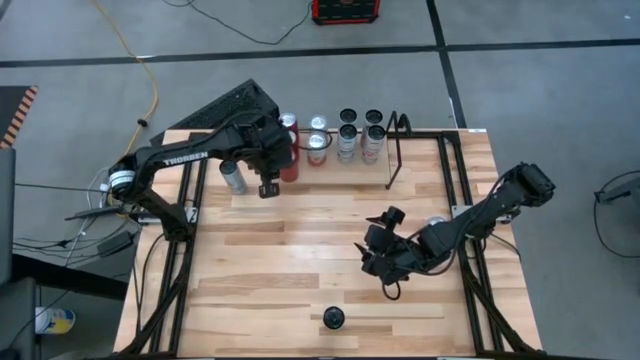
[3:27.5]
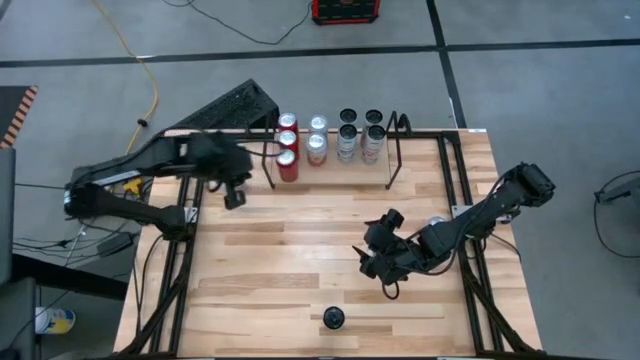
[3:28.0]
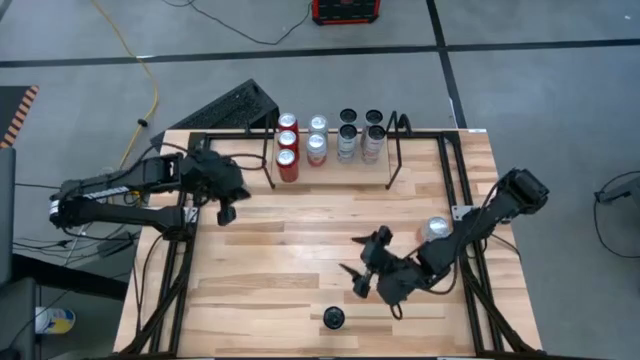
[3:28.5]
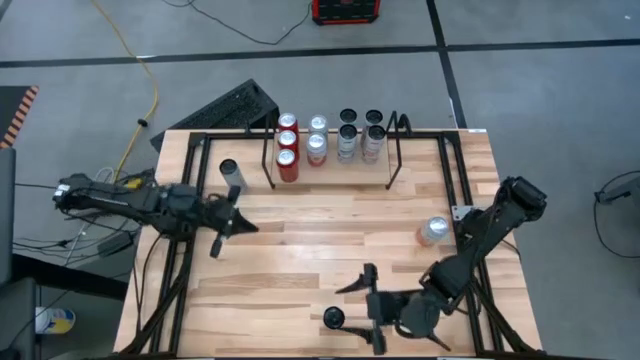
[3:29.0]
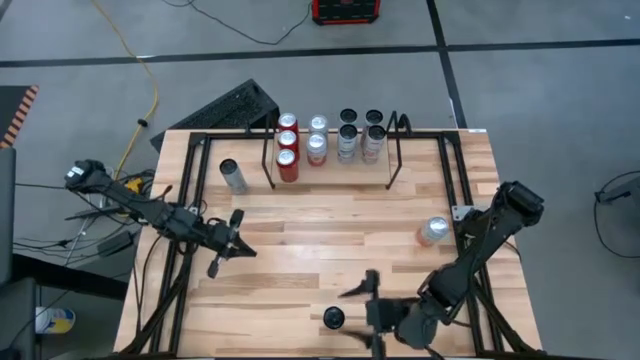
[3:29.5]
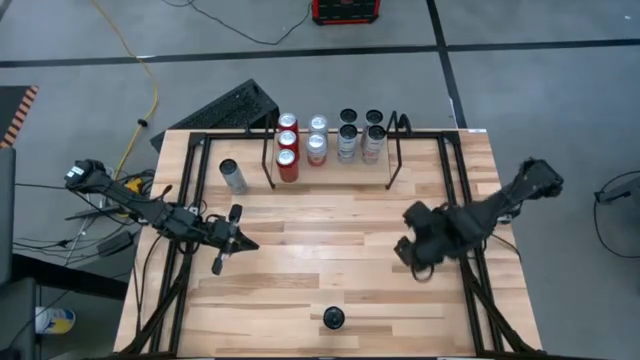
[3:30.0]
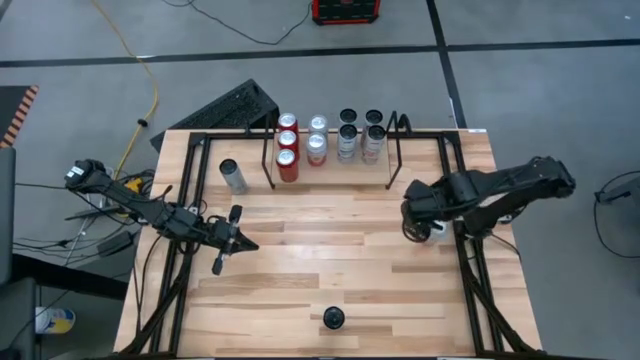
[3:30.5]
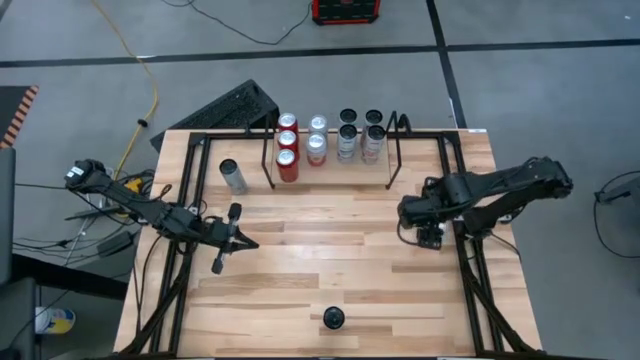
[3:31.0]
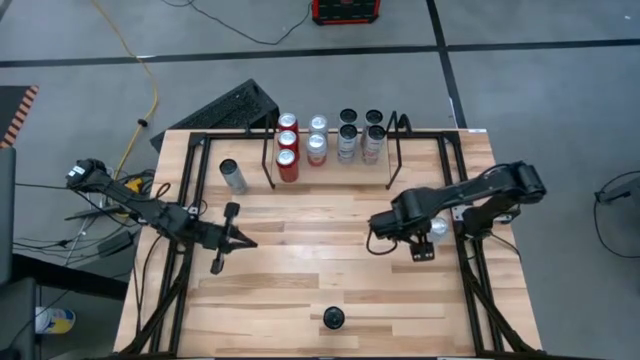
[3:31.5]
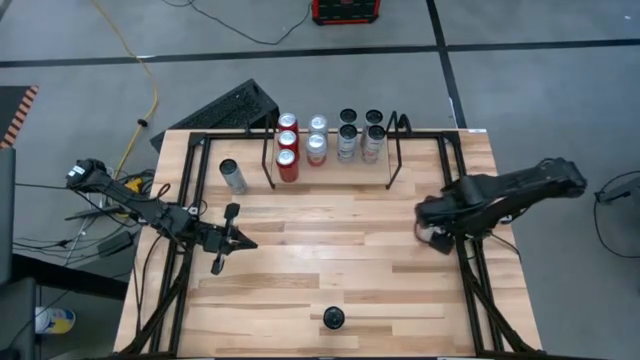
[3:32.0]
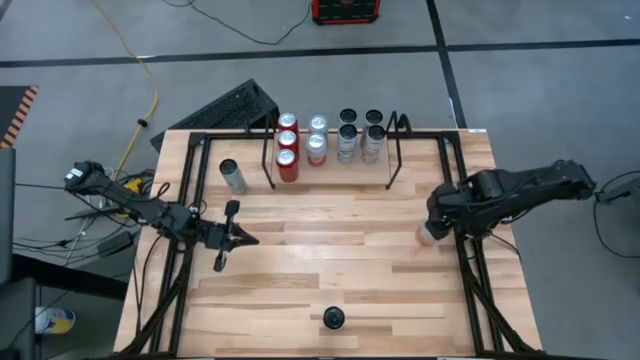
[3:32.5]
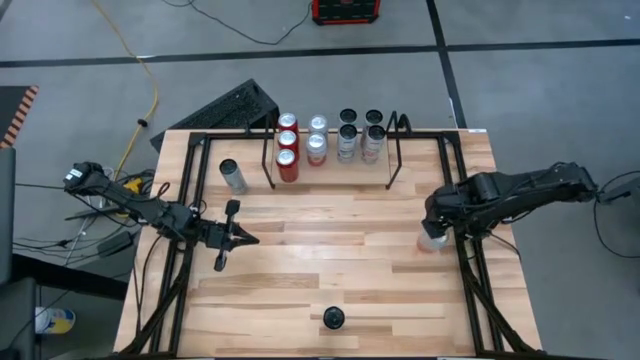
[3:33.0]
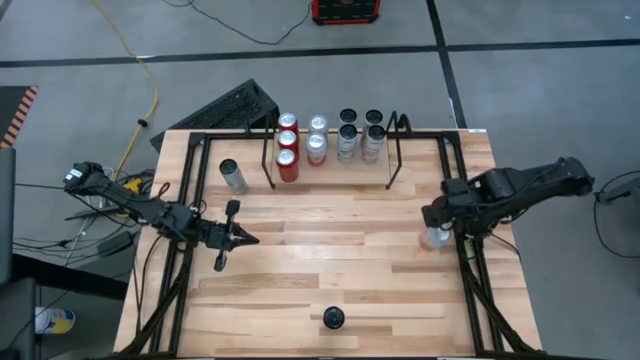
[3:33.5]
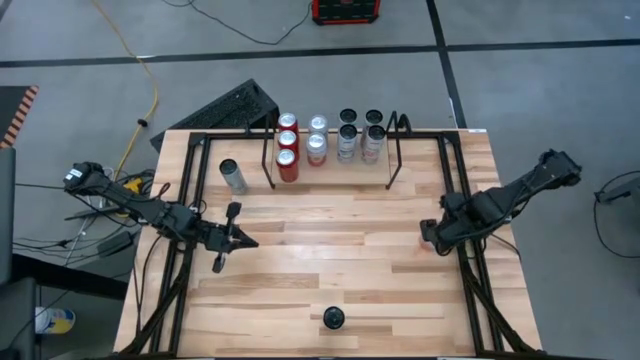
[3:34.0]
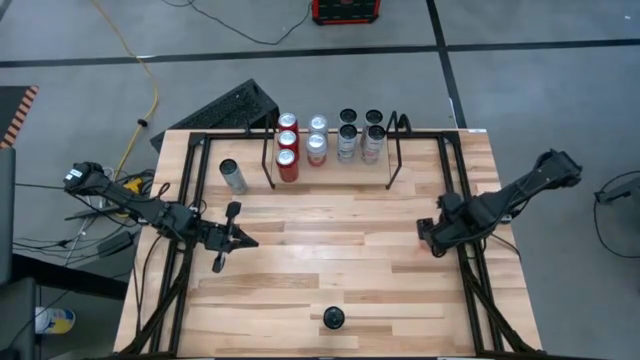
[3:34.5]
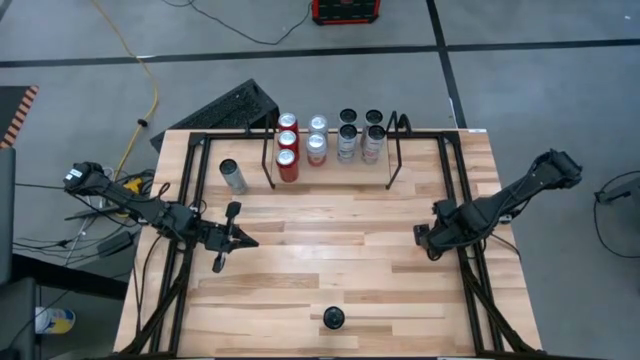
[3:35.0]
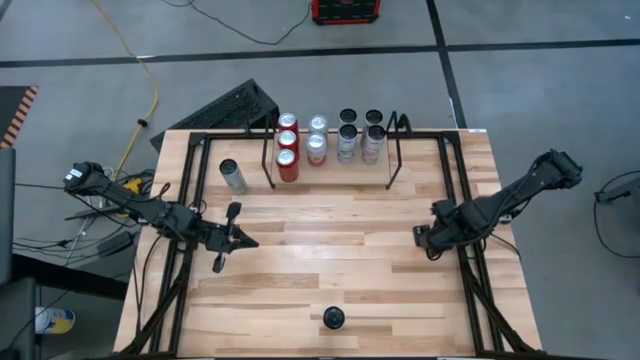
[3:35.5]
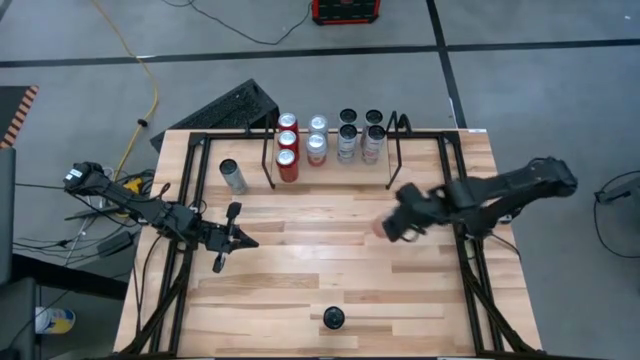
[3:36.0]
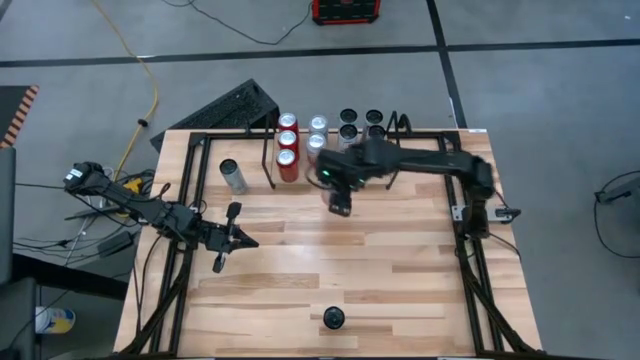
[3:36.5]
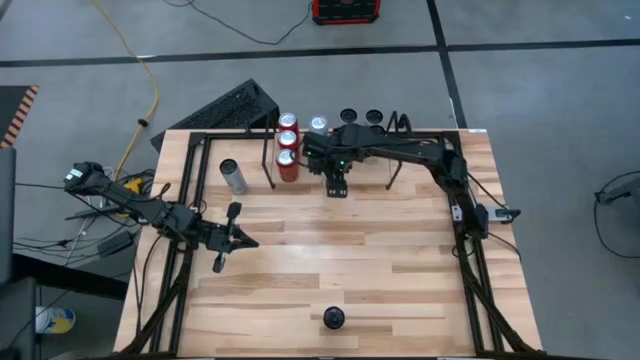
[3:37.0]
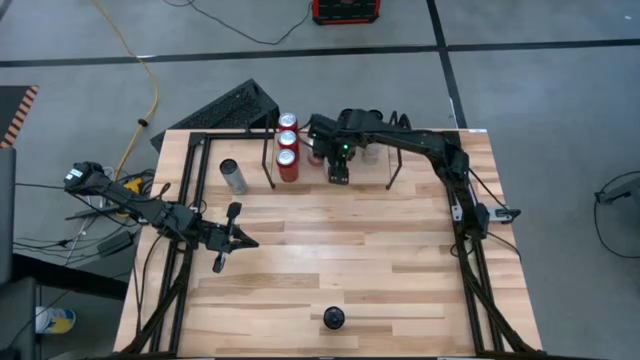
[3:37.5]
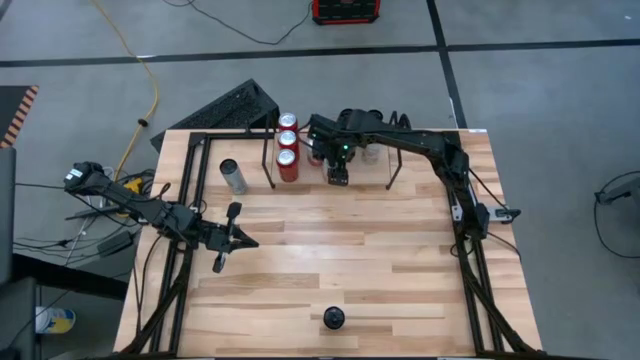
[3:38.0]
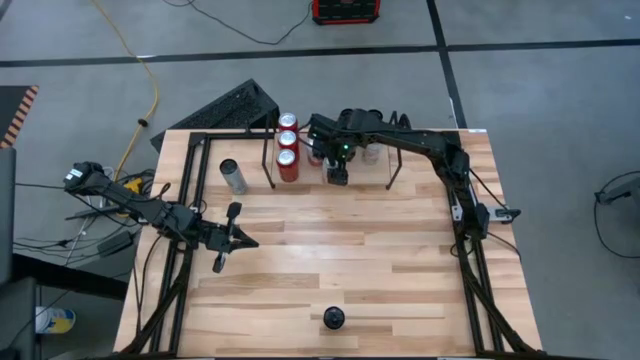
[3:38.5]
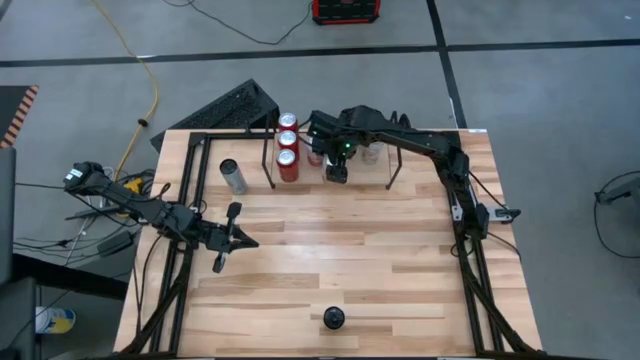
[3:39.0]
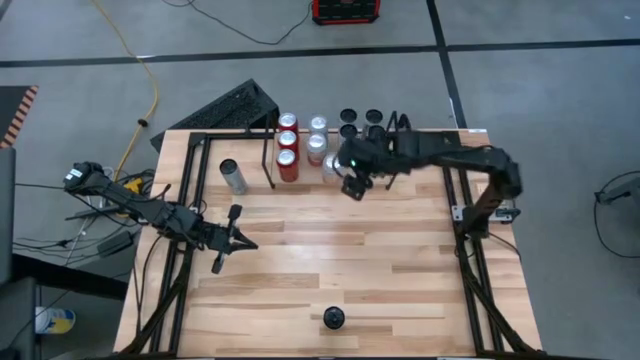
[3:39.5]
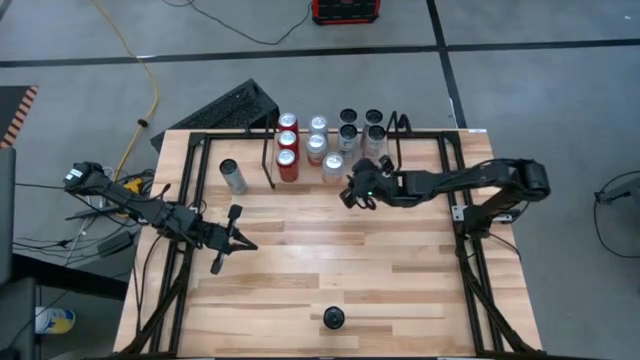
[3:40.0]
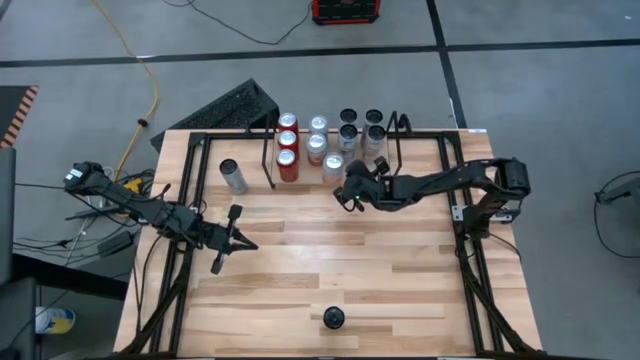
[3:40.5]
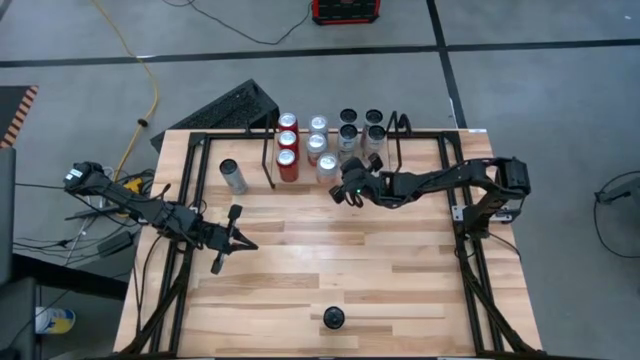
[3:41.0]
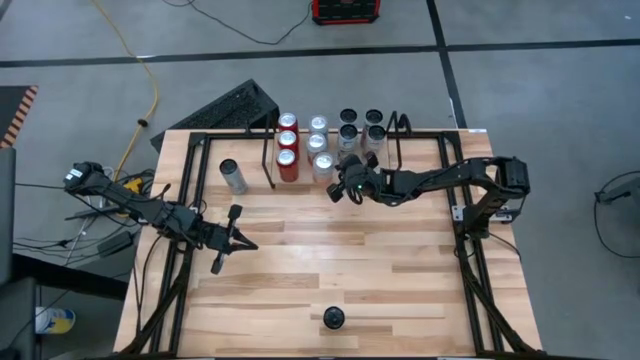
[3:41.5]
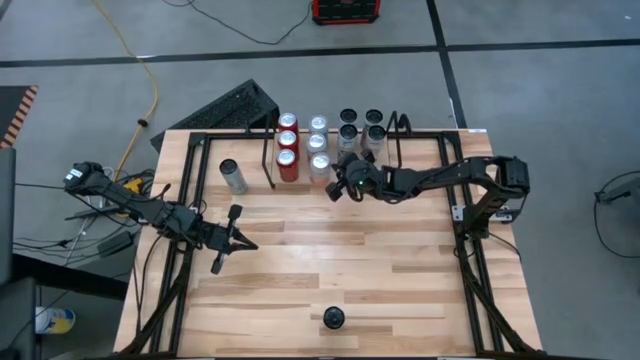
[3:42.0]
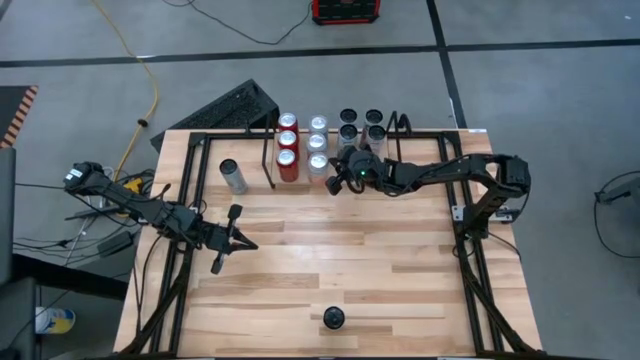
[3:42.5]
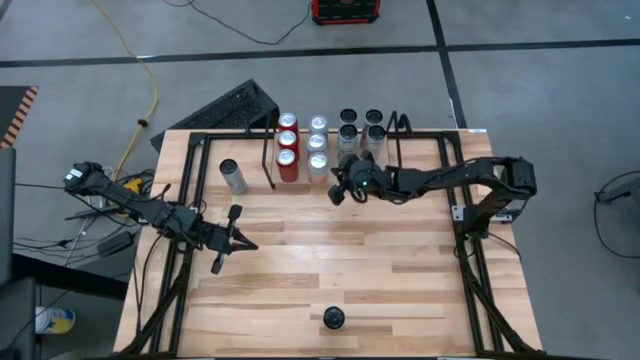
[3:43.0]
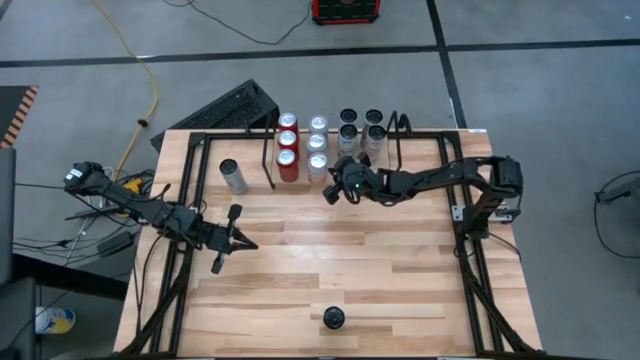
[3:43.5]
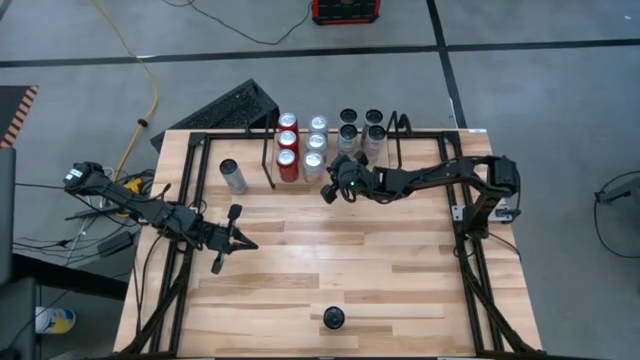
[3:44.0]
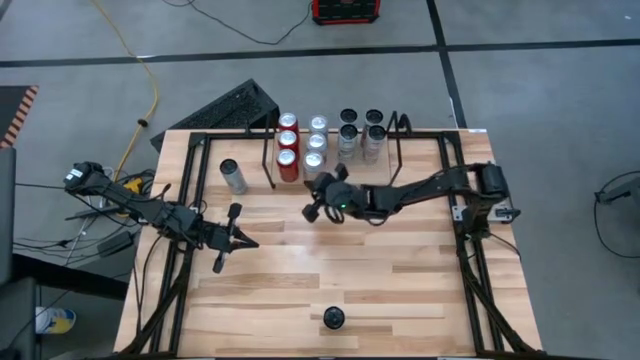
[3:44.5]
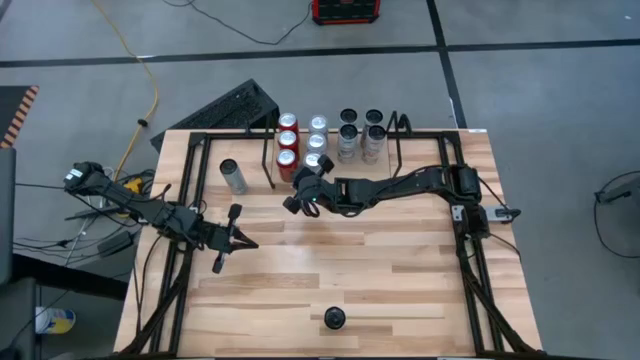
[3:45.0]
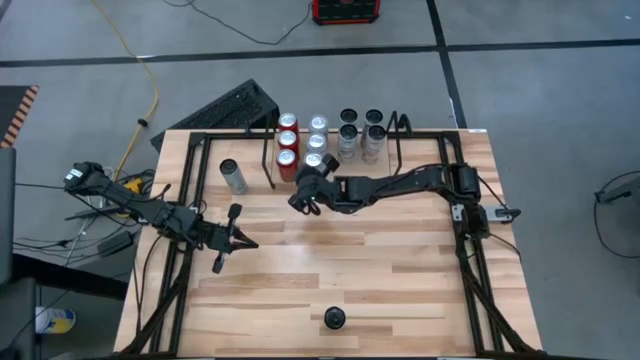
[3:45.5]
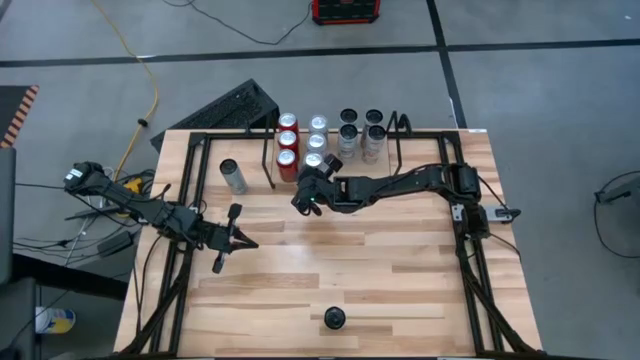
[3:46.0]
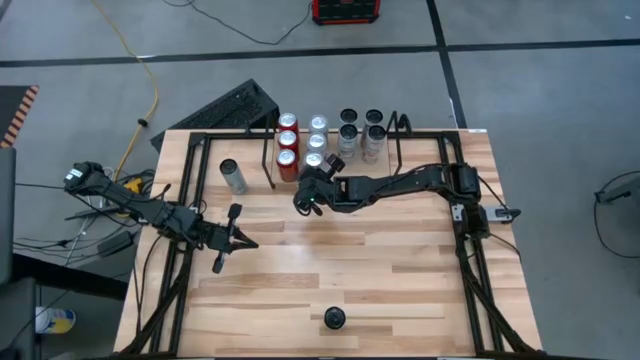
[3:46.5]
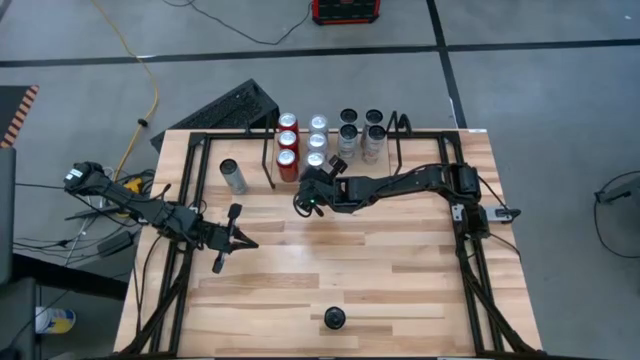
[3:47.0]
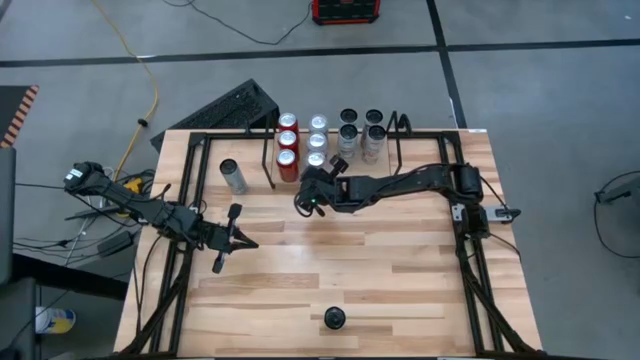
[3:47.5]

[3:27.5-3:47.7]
Task: Place canned beverage on shelf
Put the pink white soda can on the shelf and align with other pink white soda cans

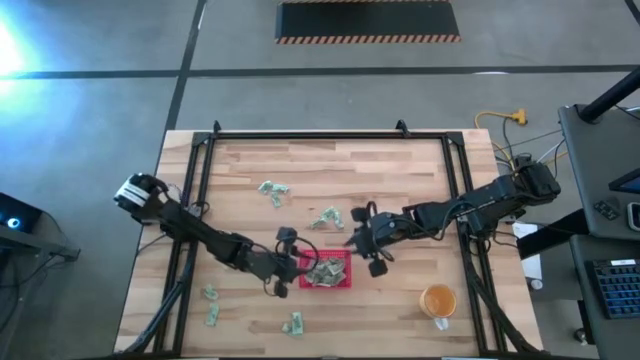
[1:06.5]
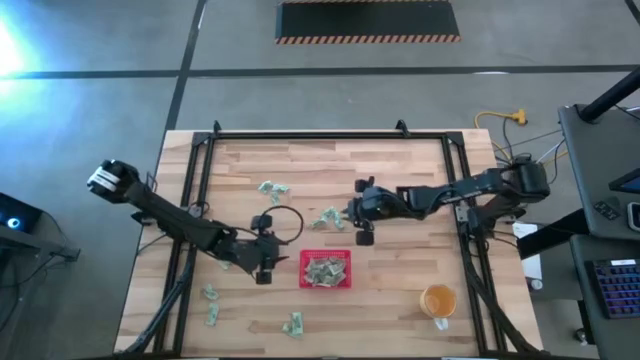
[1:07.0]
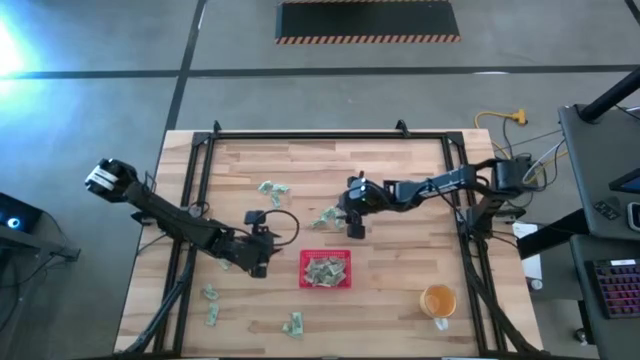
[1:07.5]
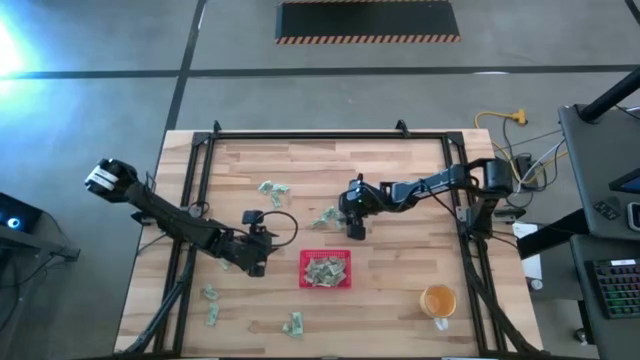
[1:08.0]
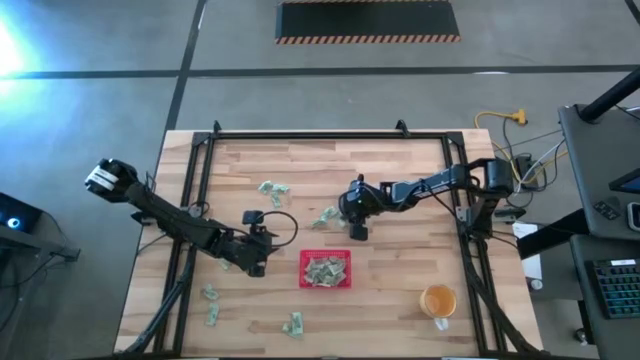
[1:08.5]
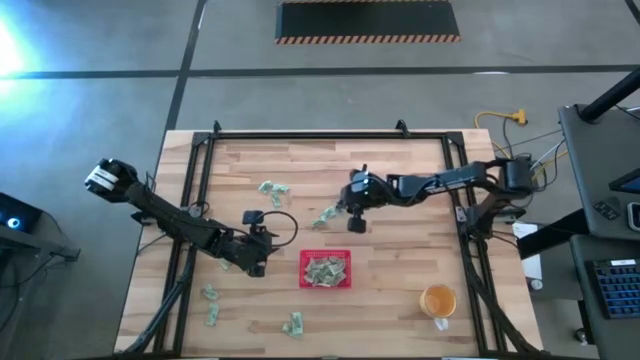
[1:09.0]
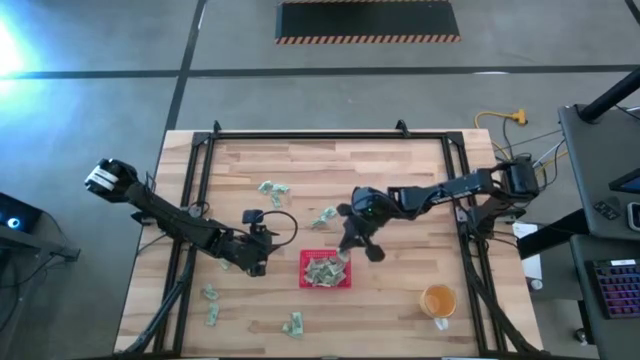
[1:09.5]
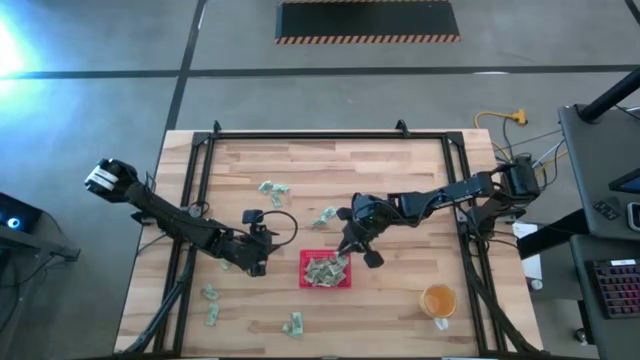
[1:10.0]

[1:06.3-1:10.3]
Task: Pick and place Stevia / Truvia into bins
Put the white stevia packet into the red bin
